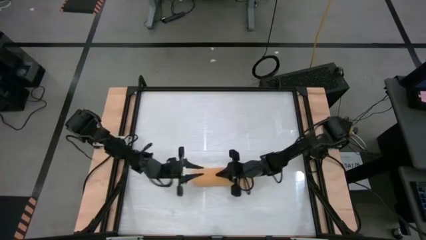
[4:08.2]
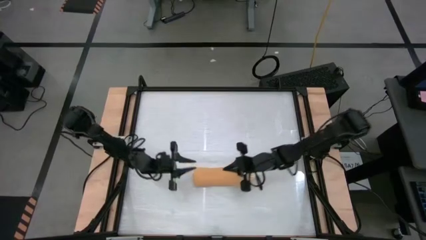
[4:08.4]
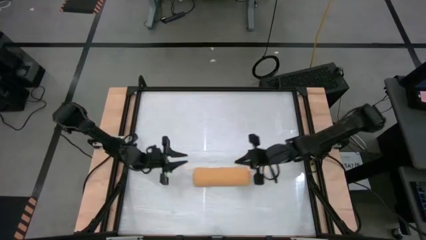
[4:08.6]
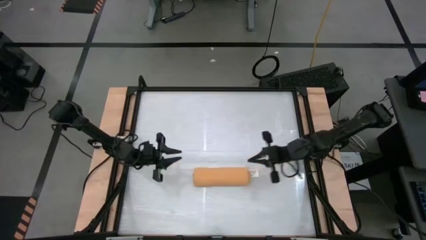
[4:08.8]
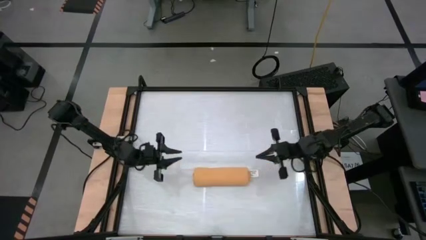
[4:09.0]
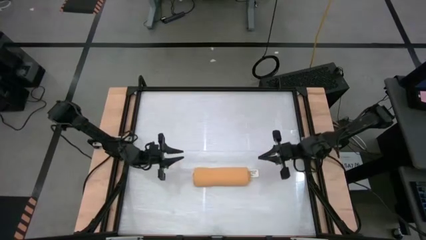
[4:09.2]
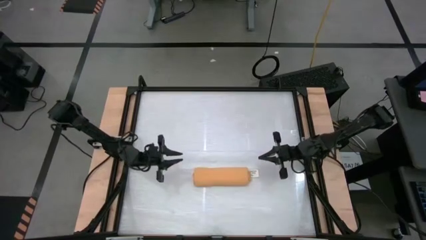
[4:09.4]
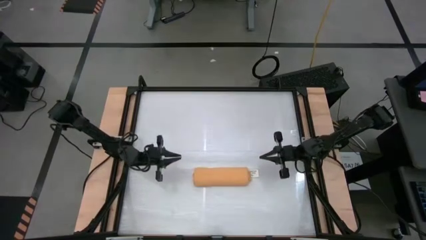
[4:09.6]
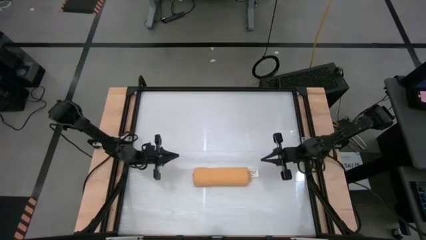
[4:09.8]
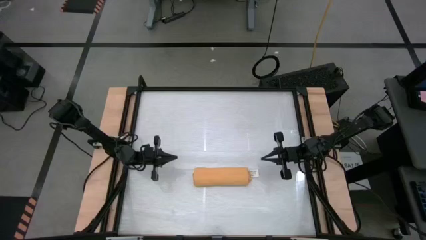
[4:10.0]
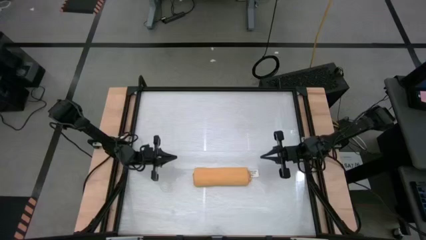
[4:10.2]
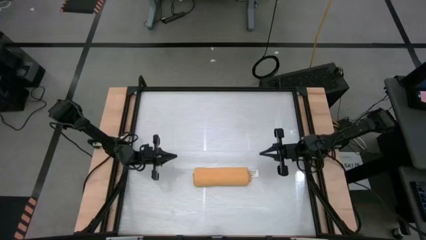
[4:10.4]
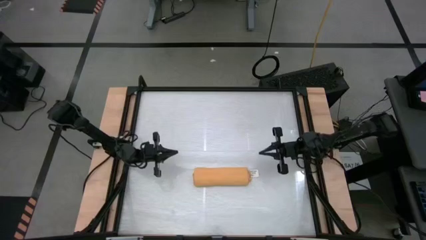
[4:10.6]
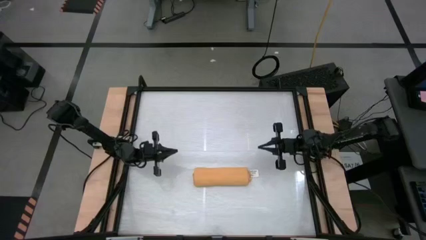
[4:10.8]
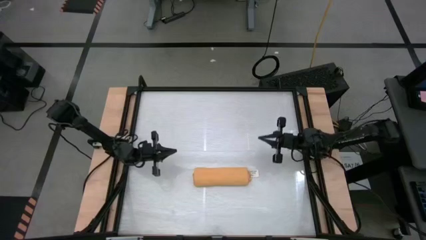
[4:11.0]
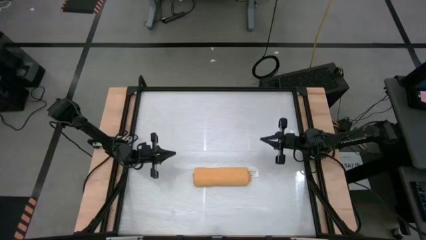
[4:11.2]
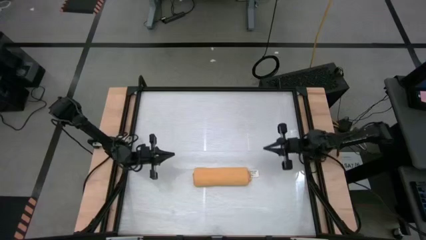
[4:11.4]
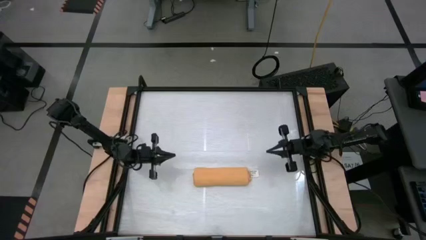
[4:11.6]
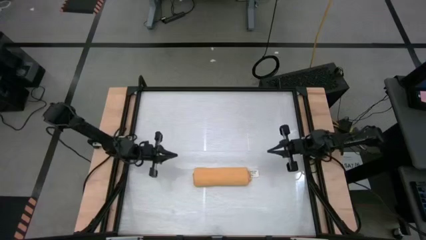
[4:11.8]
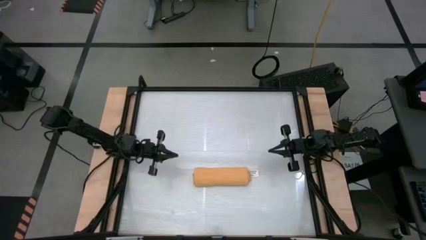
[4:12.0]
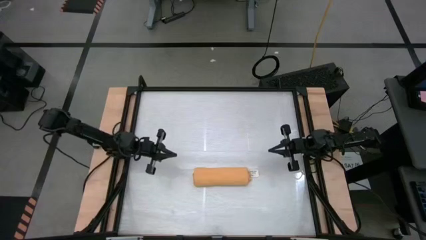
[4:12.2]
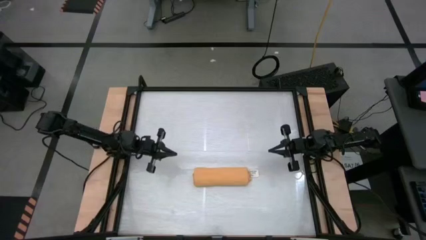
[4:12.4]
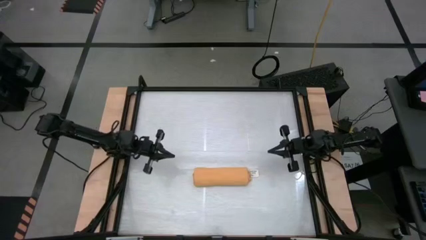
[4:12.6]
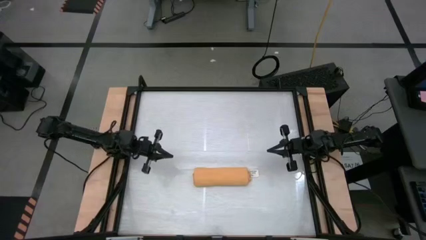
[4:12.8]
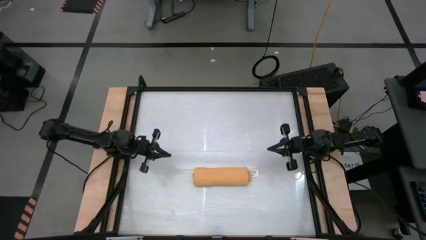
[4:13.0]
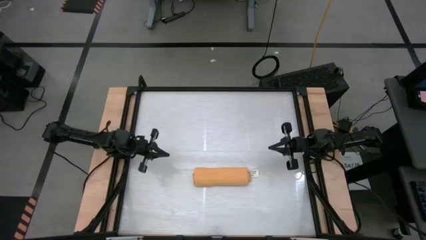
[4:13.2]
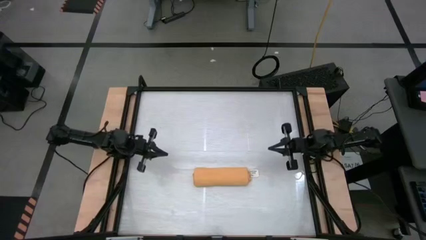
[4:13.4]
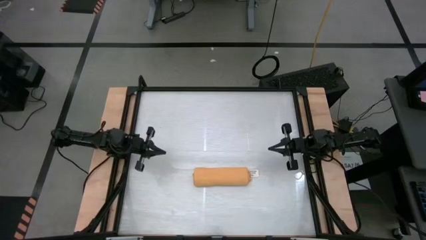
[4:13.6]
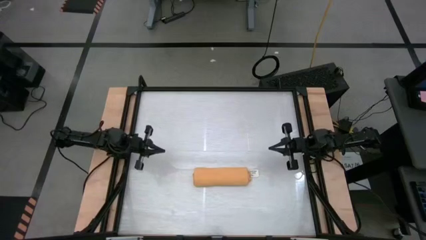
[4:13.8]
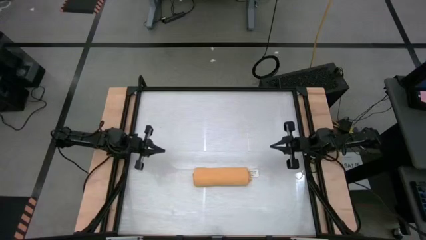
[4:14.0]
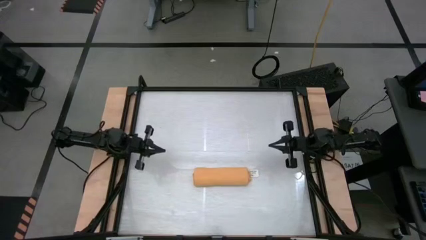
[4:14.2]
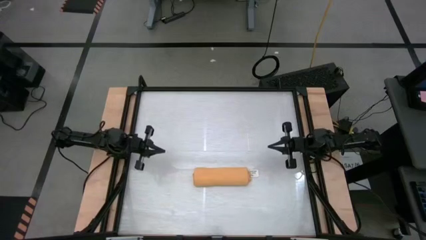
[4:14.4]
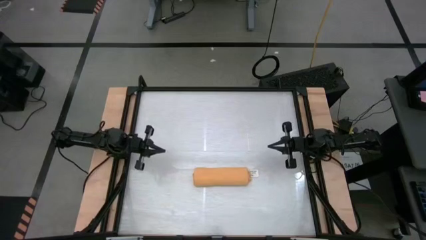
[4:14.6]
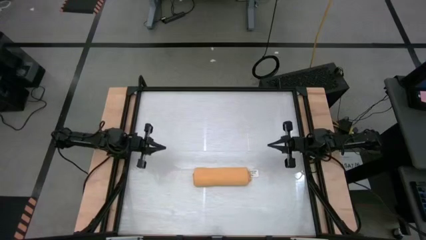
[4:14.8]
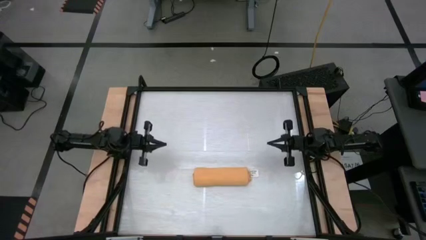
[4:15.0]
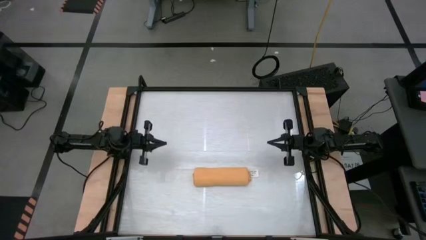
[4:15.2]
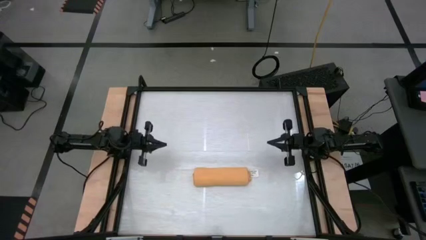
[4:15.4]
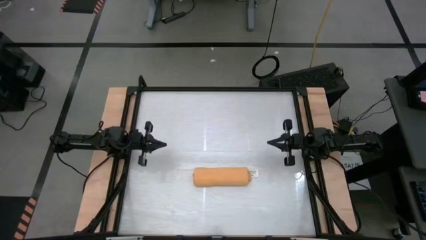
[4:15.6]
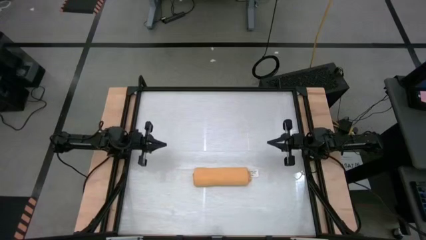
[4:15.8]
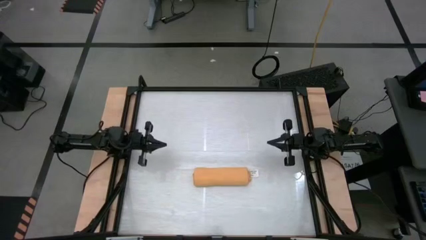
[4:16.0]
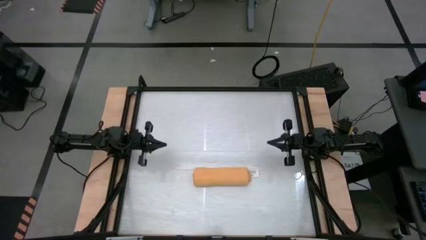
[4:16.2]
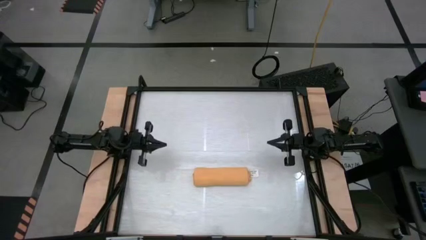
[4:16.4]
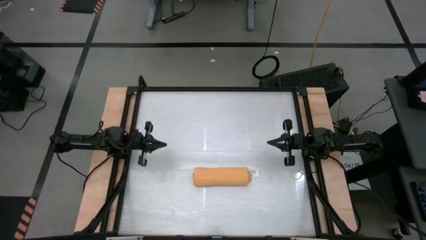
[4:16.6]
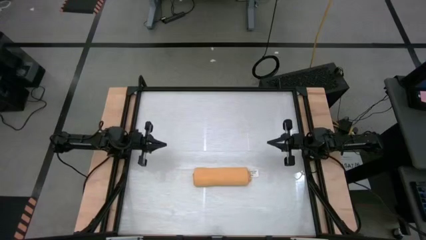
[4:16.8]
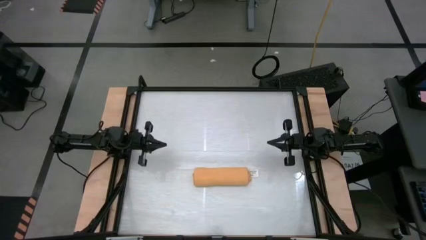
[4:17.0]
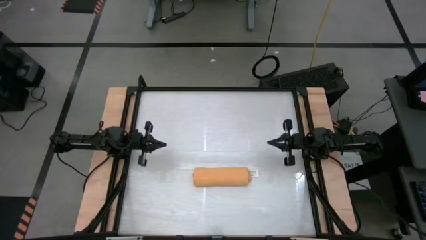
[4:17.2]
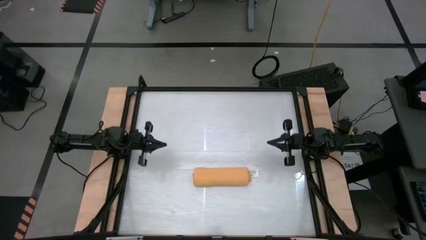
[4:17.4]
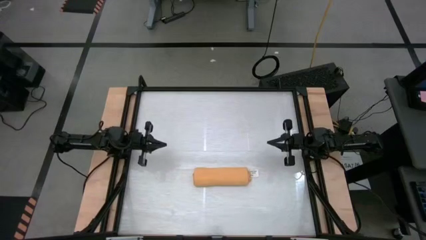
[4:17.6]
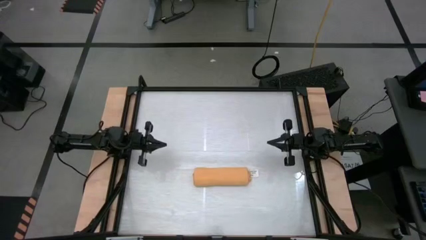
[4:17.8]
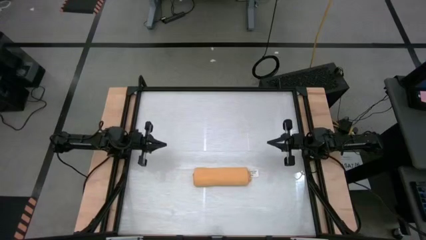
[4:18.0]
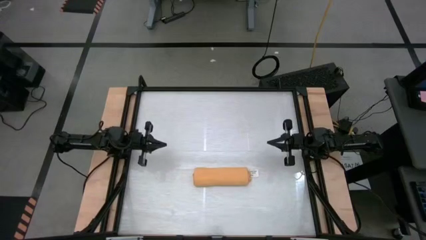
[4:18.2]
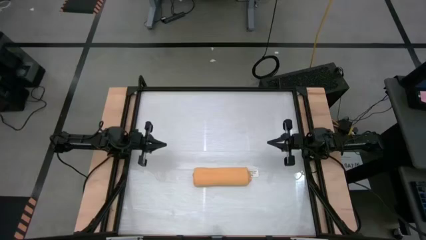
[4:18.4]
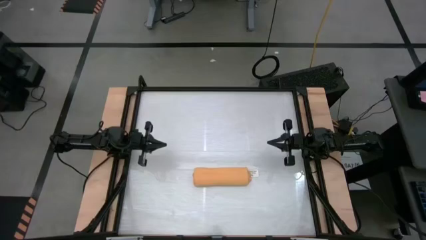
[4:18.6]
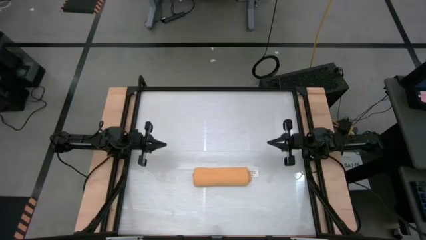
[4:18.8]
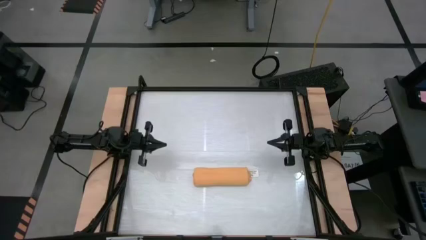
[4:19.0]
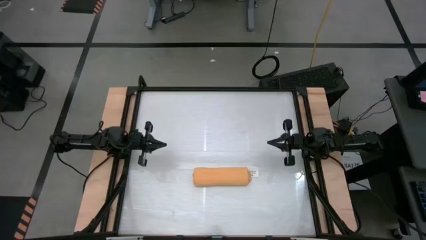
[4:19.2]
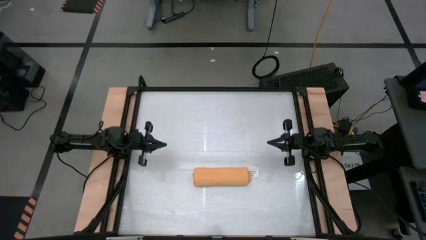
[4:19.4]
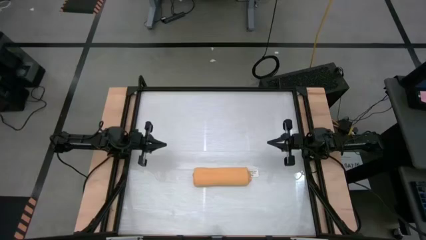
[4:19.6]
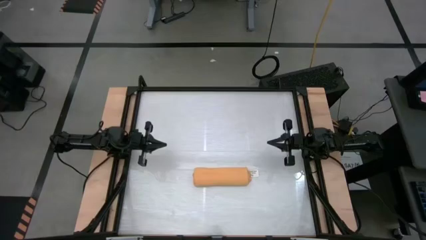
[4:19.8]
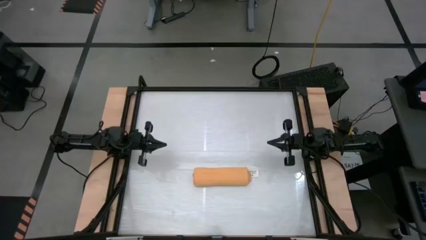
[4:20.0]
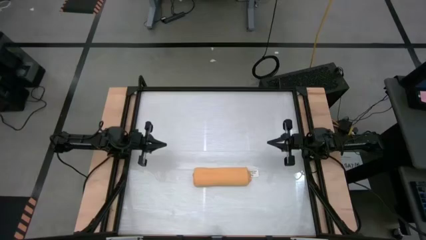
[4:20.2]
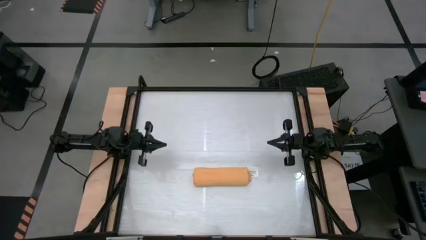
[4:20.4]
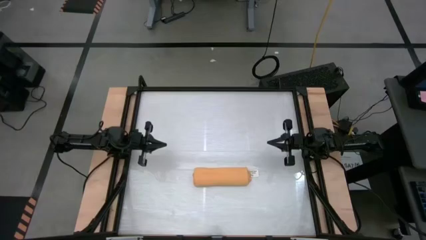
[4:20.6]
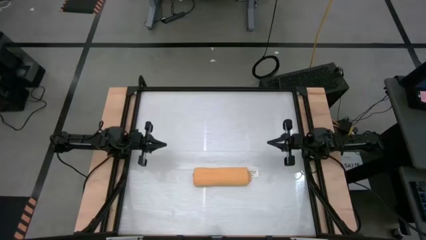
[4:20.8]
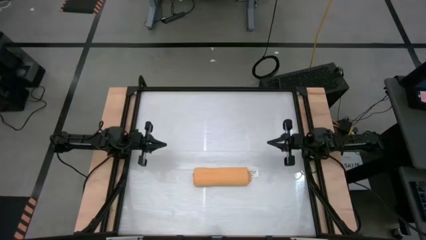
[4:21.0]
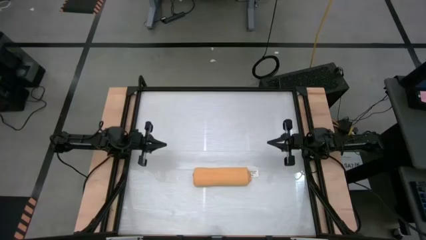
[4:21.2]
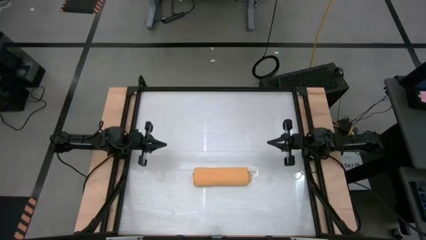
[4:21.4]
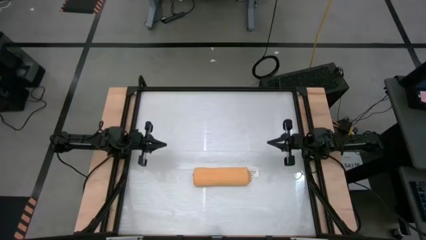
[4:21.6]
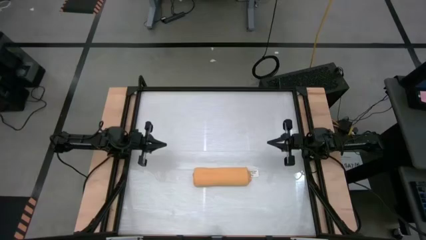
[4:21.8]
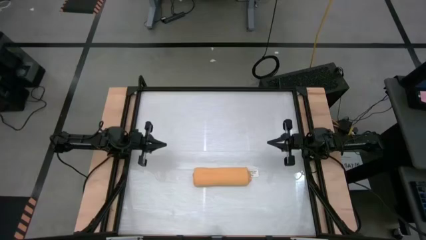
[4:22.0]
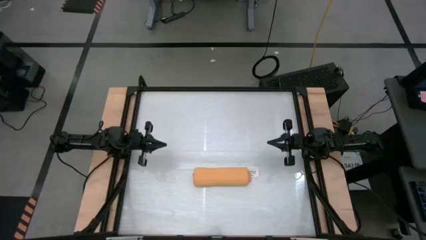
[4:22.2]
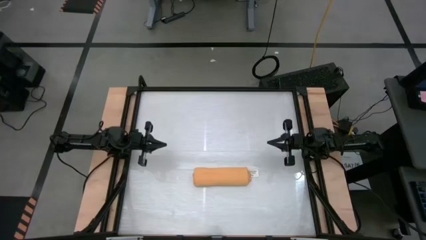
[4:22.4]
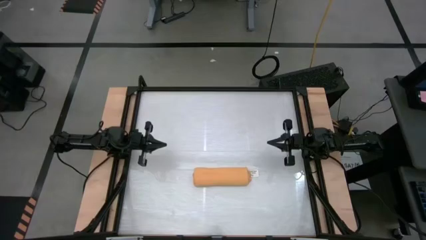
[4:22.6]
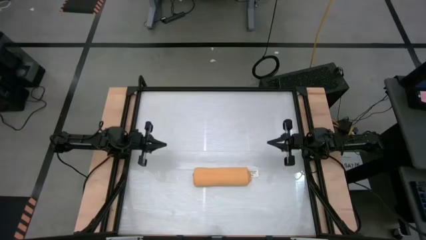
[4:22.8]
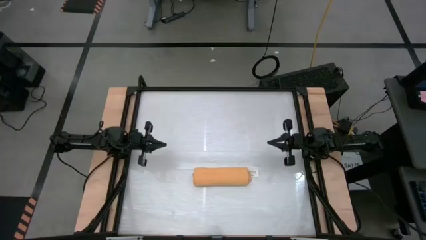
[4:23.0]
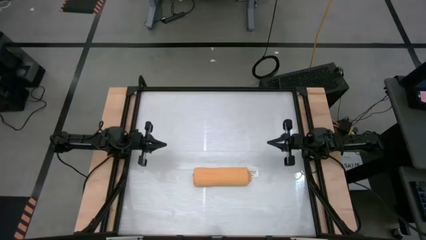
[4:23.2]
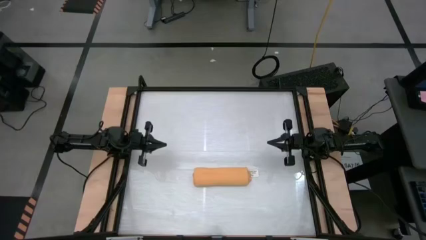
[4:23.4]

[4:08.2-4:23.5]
Task: Roll towel into tight, uniform cylinder
Return to Home Position

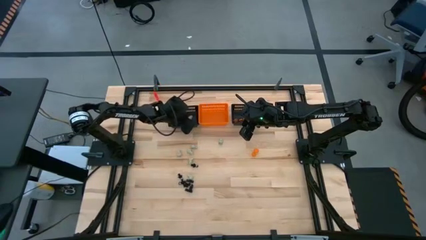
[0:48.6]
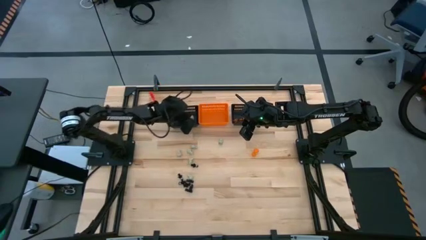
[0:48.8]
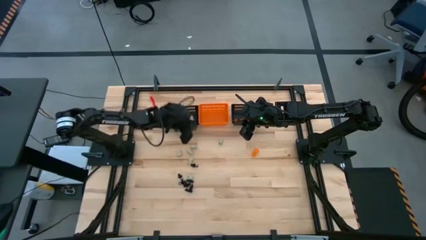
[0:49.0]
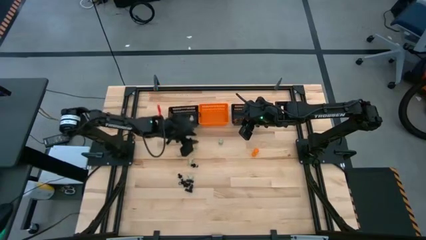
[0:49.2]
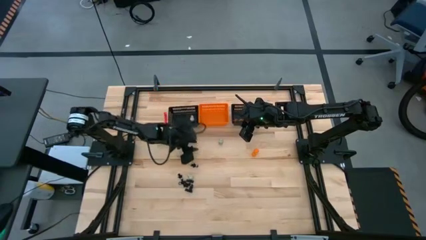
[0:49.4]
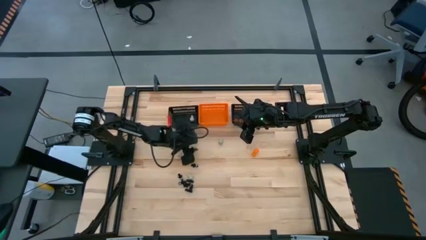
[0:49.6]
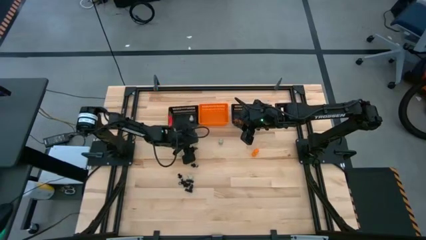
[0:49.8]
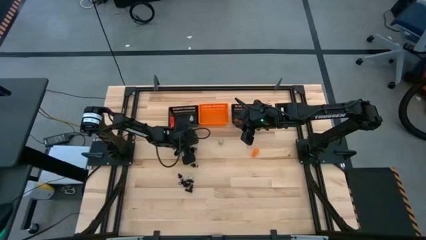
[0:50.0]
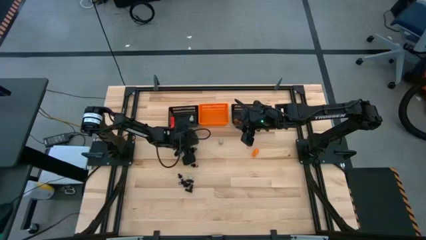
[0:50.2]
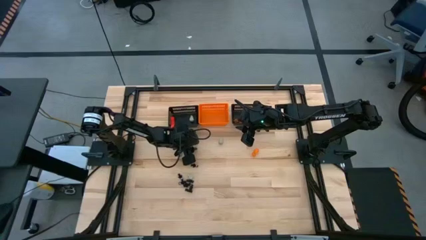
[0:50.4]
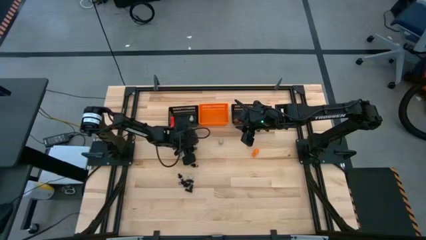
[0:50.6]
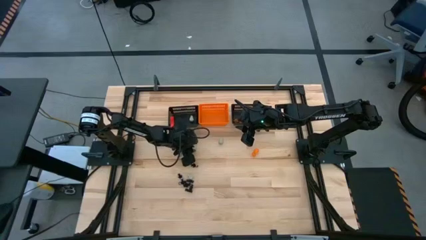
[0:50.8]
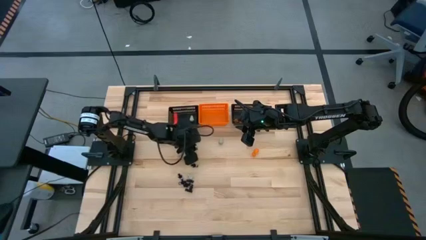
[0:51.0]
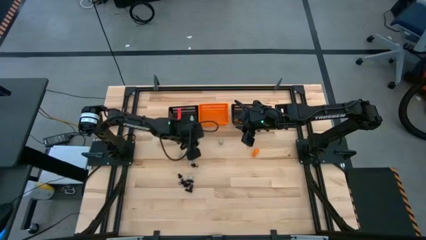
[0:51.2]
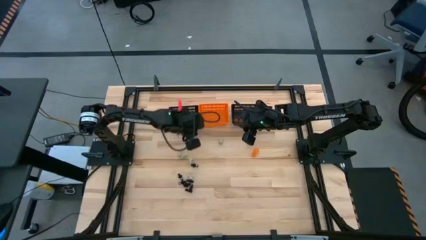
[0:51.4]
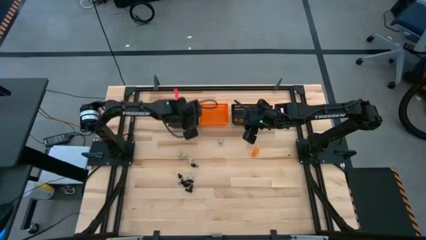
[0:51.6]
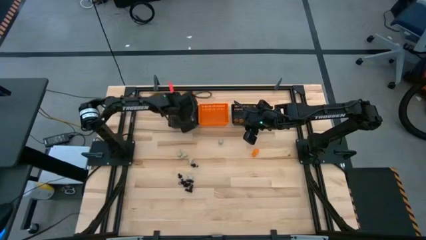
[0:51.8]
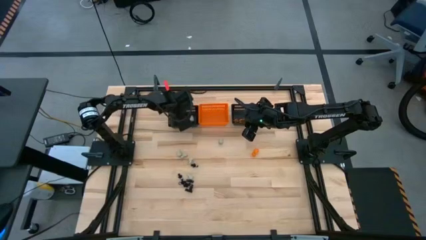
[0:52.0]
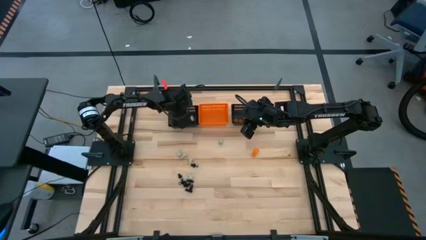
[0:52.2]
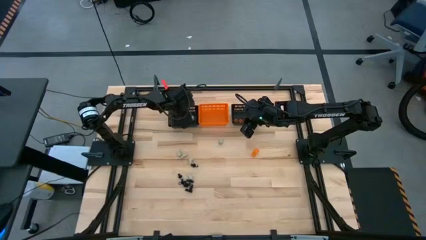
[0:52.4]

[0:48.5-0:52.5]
Task: Sort Halloween decoration
Put the white skull toy into the left black bin
